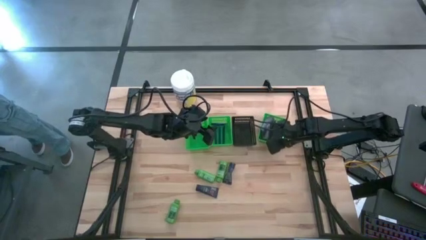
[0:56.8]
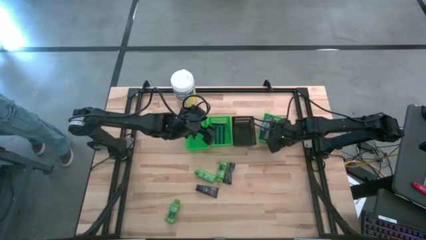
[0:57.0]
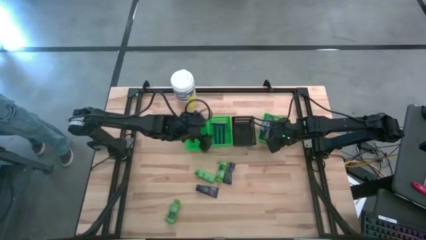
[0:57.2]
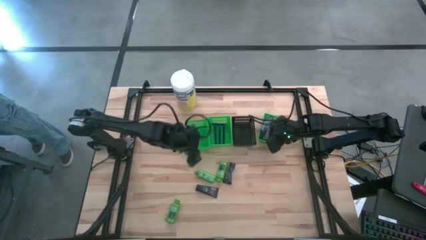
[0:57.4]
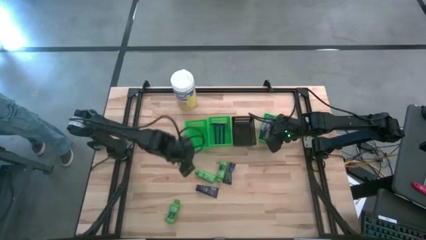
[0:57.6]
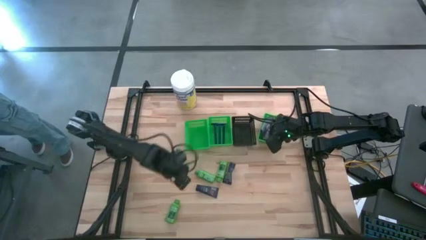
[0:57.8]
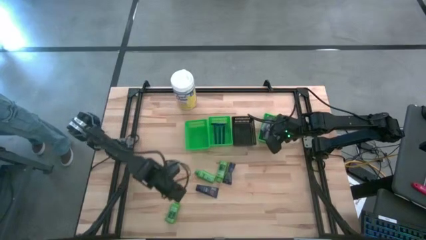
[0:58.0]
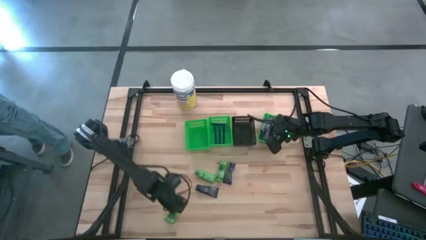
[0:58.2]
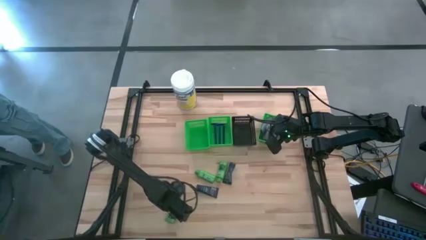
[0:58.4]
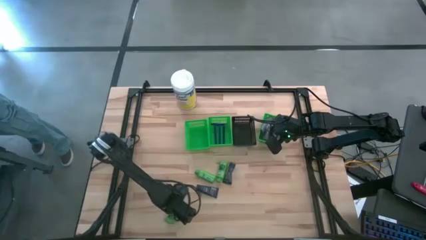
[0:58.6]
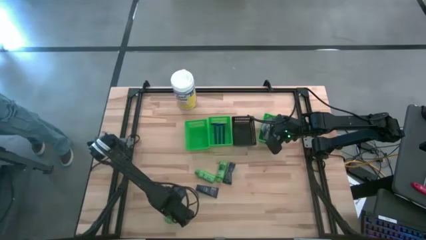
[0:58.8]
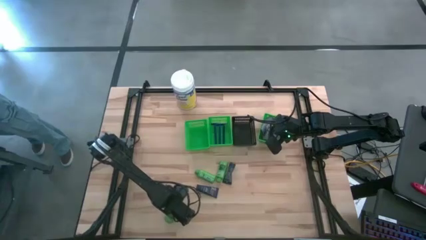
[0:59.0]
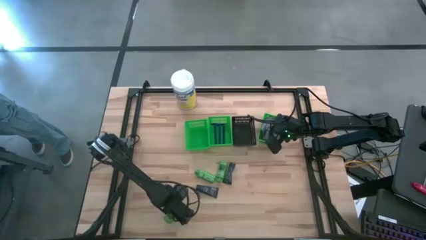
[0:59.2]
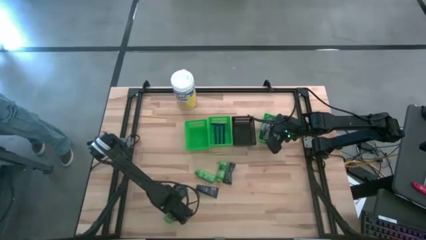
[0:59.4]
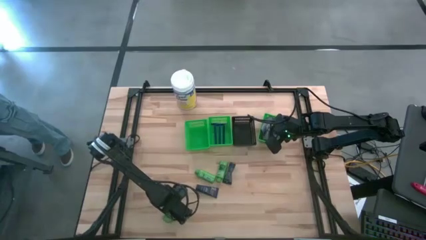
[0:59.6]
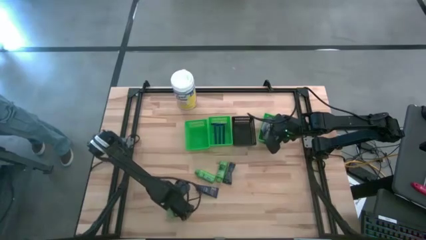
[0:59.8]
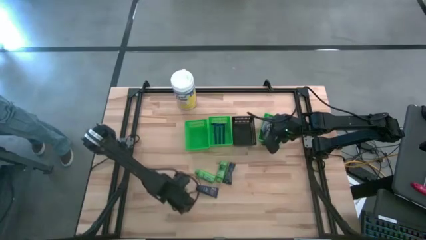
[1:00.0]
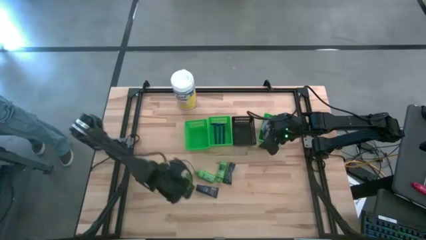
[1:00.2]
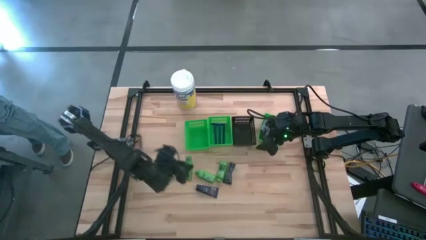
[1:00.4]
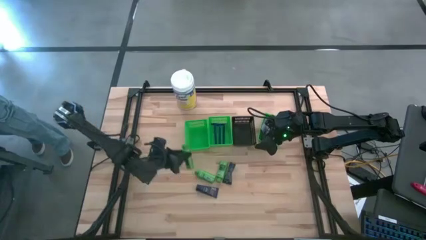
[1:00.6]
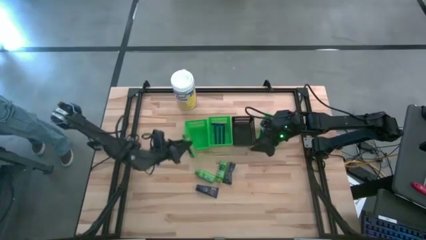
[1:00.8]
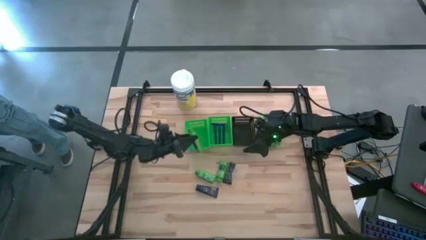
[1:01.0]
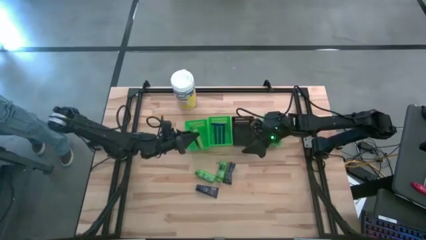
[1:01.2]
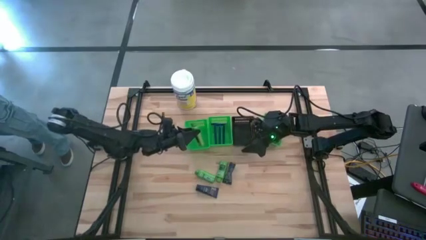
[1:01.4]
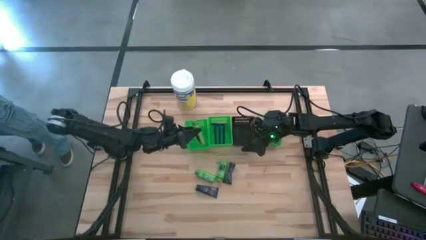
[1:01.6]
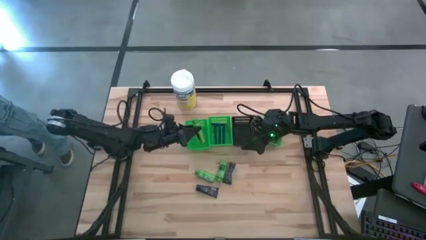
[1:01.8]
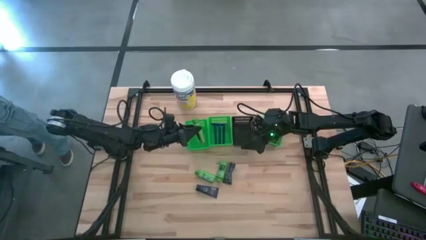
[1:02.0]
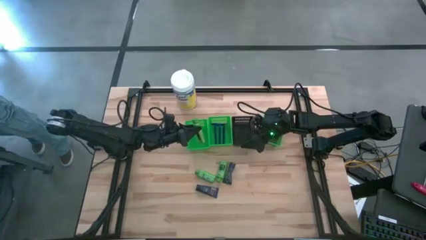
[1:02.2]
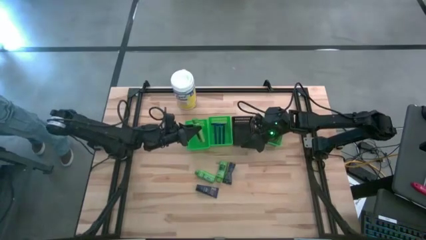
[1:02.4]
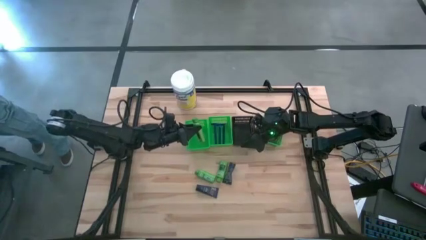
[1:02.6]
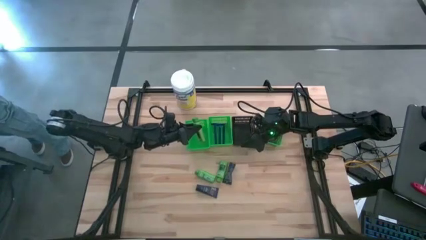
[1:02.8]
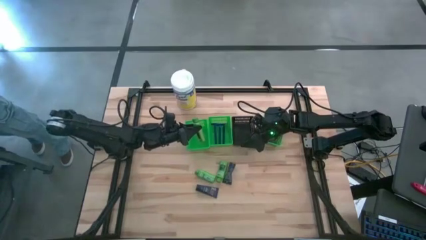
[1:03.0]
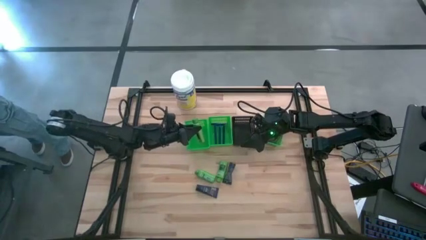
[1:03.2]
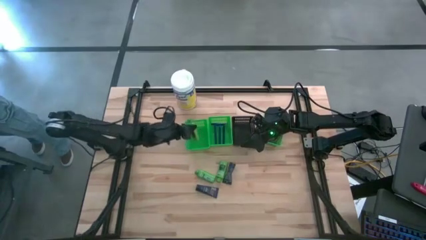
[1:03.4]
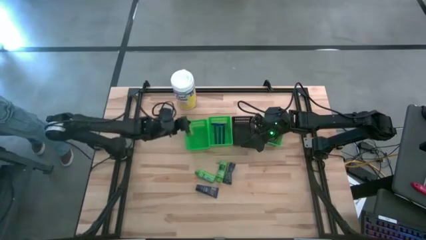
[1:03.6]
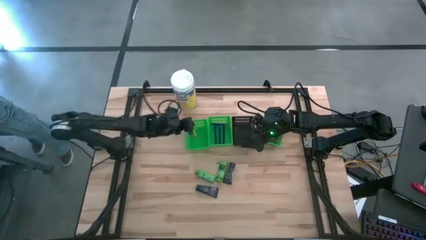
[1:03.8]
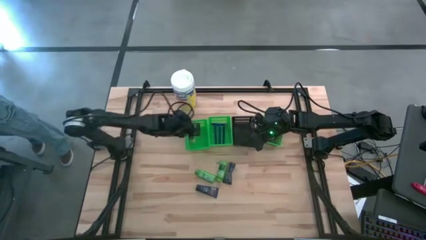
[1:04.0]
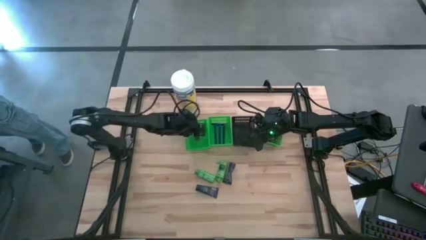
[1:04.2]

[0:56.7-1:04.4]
Task: Pick & Place Travel size toiletries
Put the bottom shampoo into the left green bin

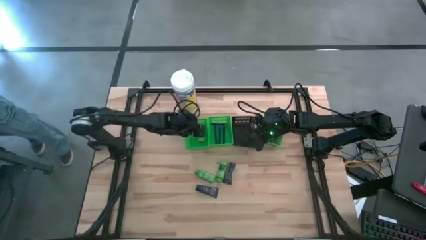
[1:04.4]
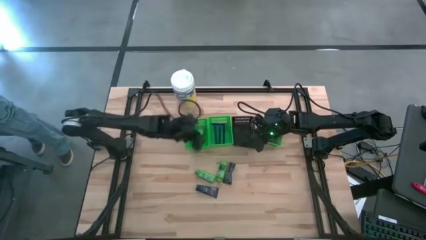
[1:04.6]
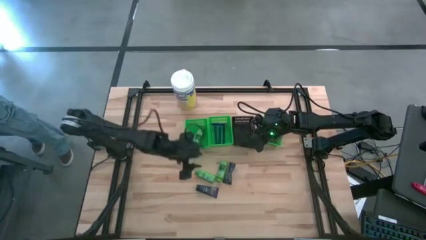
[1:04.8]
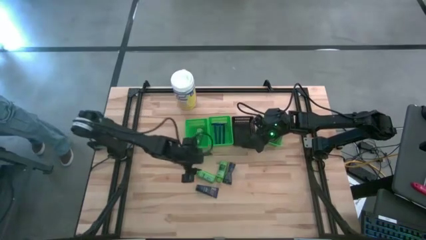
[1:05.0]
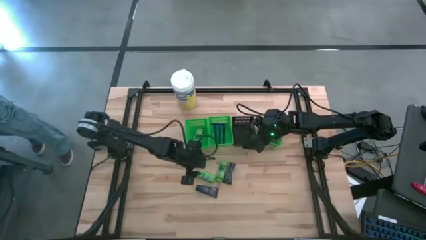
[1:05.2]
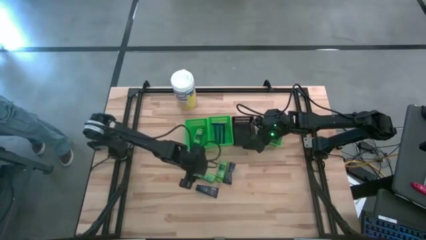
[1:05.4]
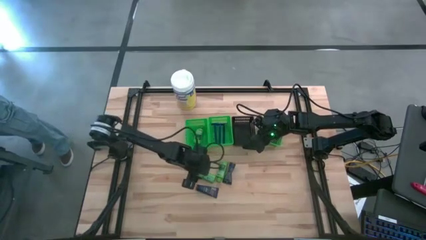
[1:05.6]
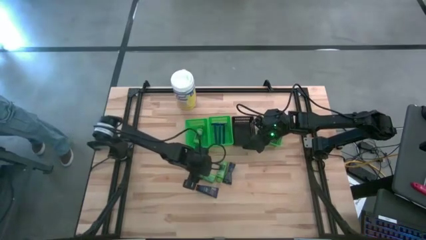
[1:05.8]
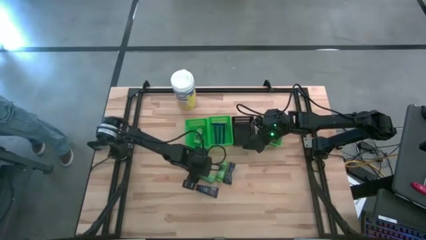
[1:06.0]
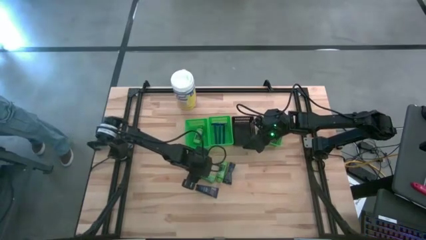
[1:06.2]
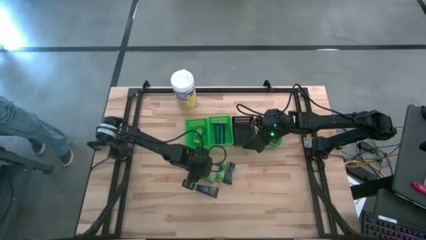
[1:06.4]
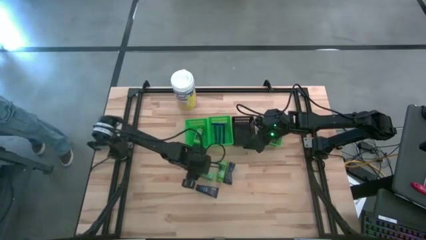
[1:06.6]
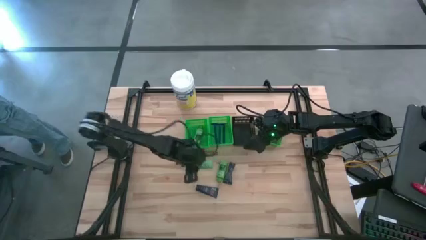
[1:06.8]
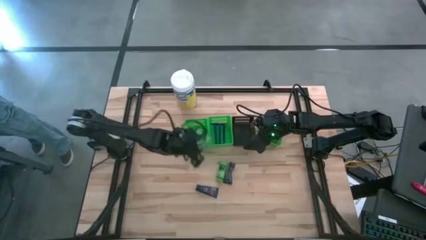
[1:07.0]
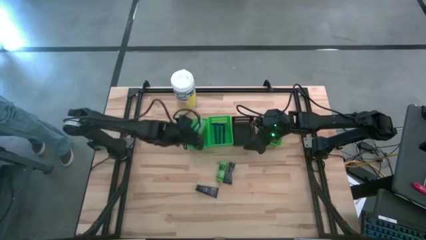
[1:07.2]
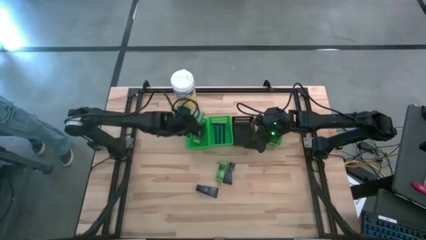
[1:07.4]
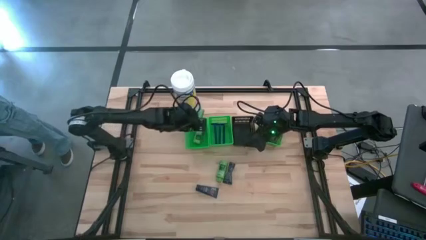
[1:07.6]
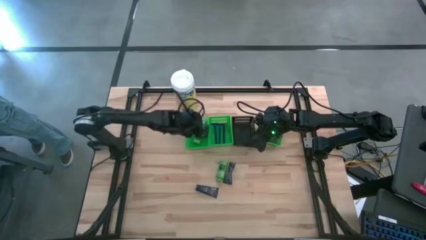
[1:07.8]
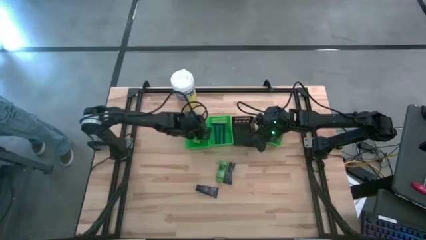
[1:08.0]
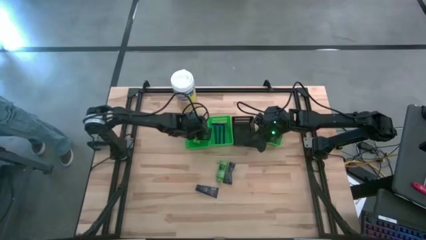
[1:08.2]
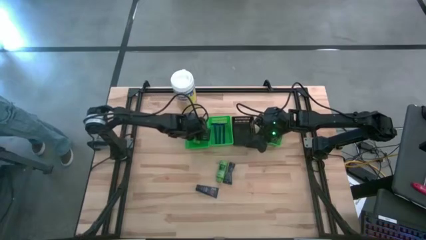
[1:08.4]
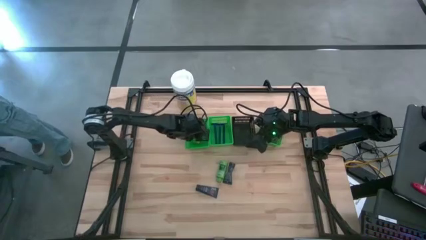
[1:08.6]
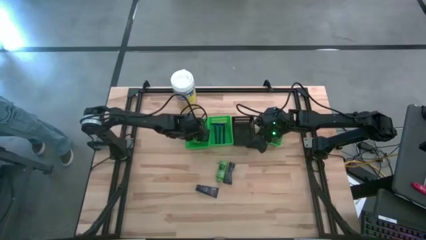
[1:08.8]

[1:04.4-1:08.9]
Put the left shampoo into the left green bin

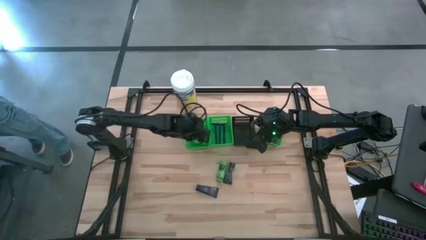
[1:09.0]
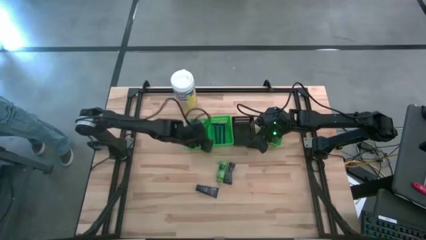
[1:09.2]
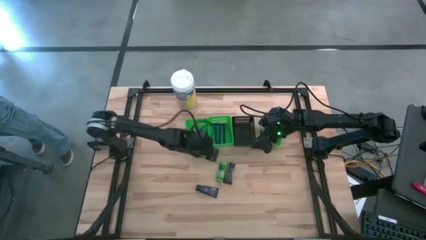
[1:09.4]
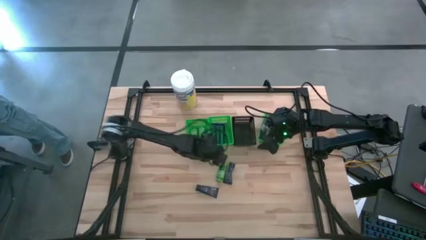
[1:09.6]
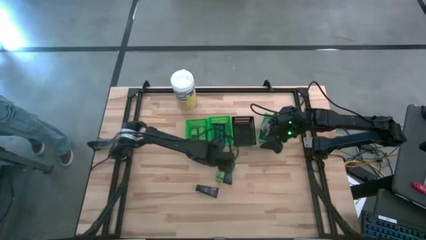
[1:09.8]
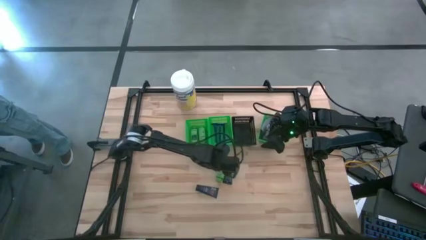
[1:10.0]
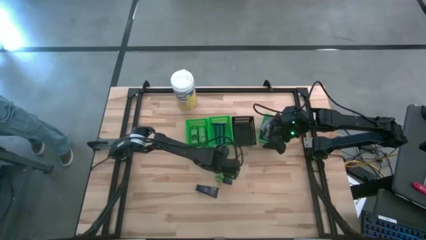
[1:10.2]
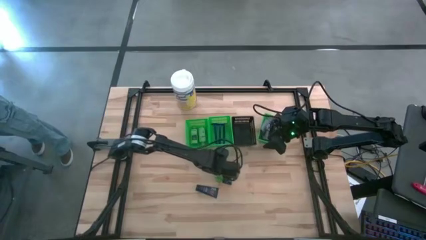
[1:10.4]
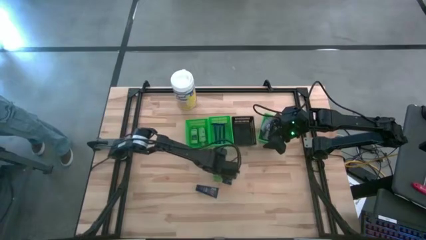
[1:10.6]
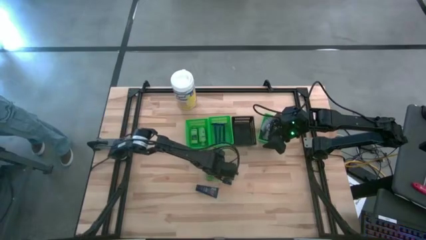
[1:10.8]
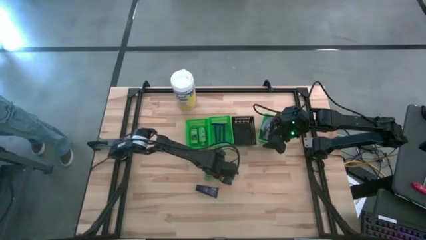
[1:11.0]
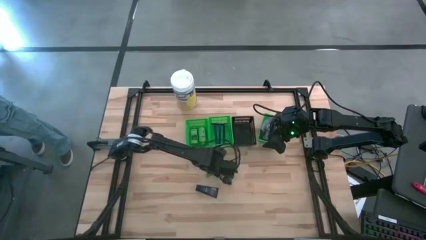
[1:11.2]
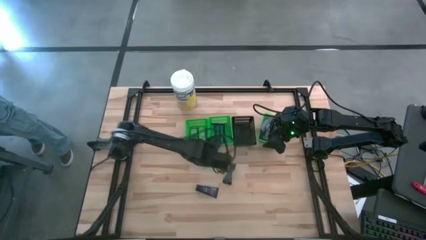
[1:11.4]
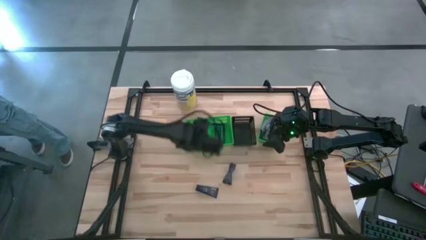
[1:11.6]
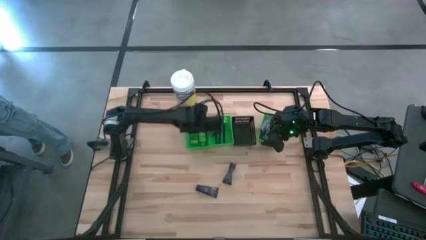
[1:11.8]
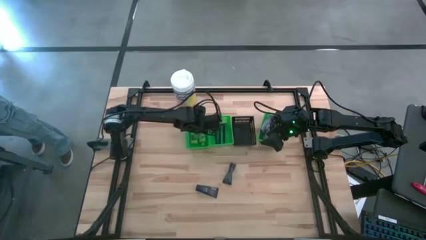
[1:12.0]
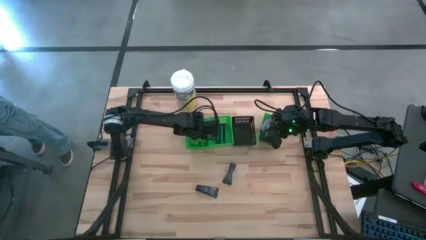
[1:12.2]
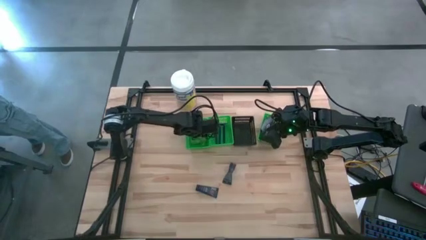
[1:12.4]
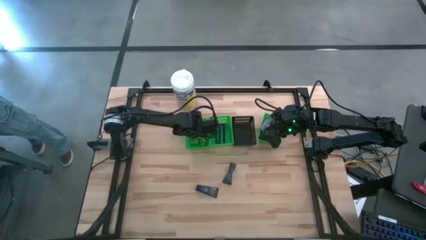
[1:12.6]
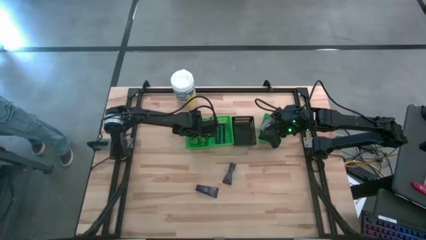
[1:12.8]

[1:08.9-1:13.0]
Put the shampoo into the left green bin
